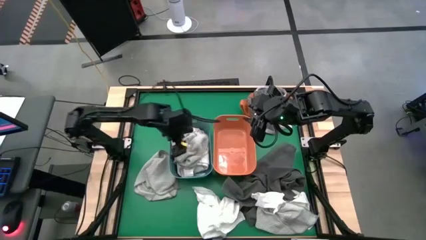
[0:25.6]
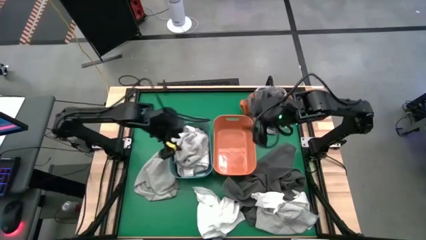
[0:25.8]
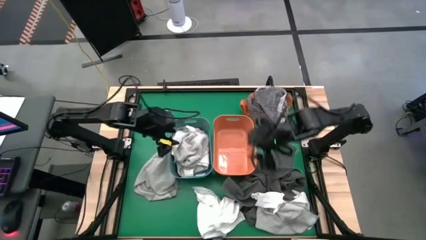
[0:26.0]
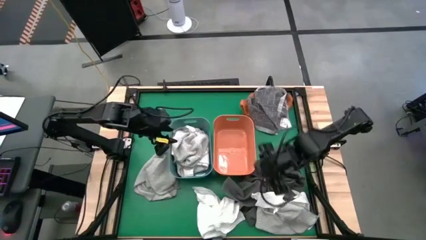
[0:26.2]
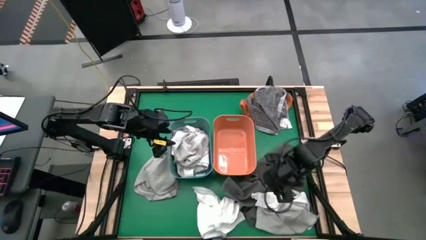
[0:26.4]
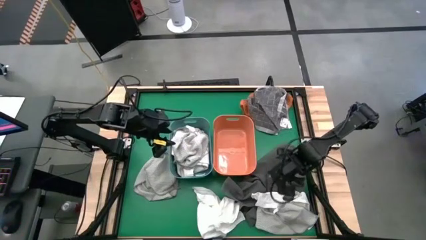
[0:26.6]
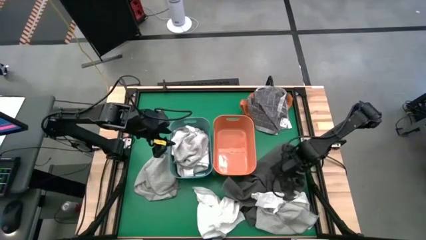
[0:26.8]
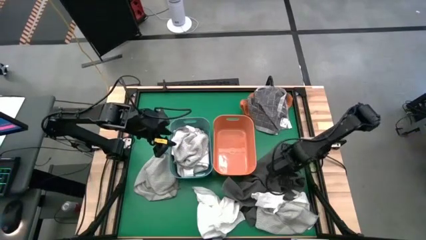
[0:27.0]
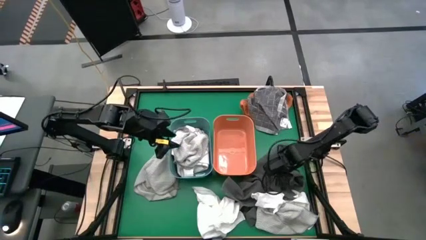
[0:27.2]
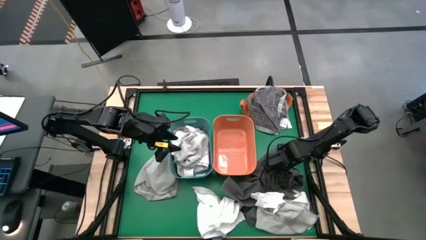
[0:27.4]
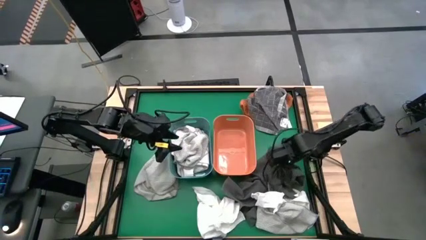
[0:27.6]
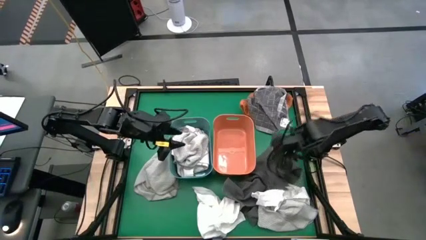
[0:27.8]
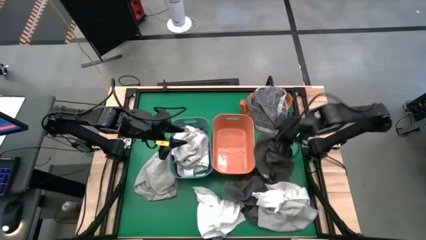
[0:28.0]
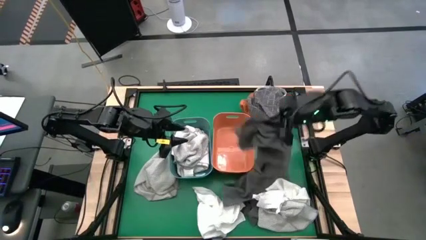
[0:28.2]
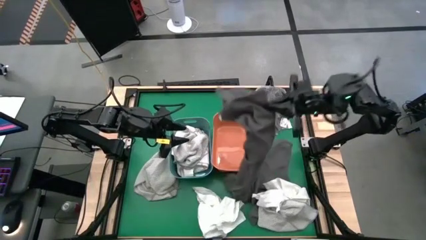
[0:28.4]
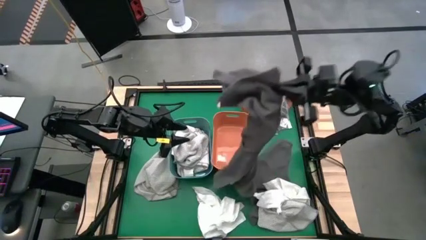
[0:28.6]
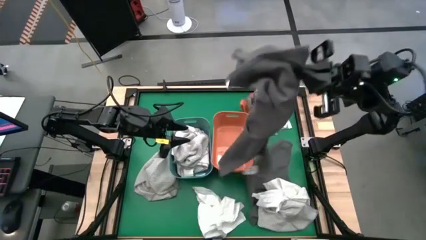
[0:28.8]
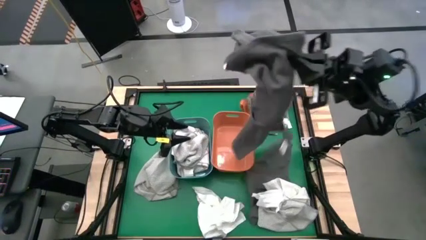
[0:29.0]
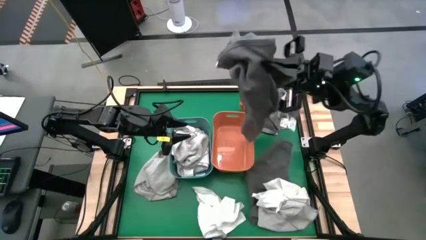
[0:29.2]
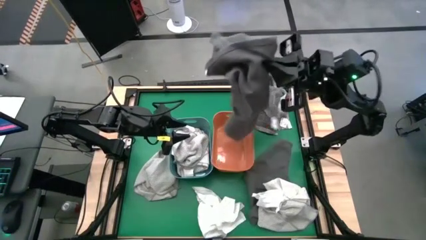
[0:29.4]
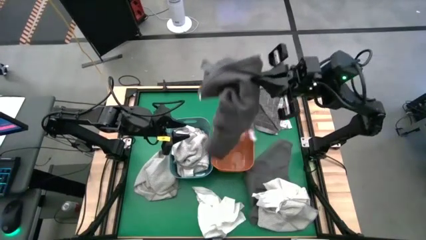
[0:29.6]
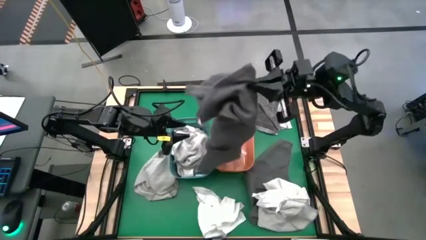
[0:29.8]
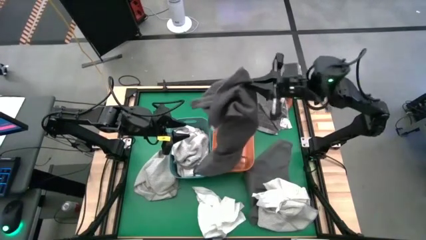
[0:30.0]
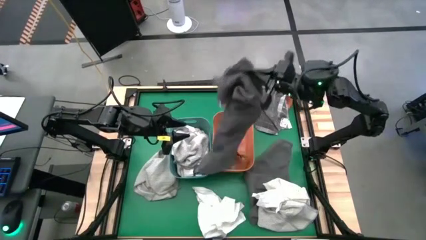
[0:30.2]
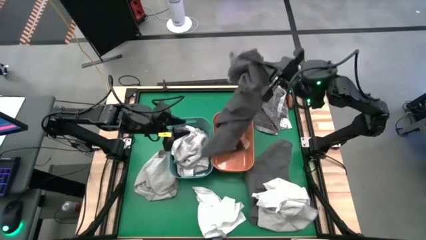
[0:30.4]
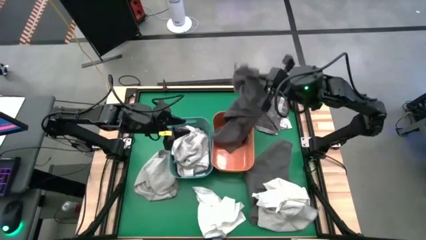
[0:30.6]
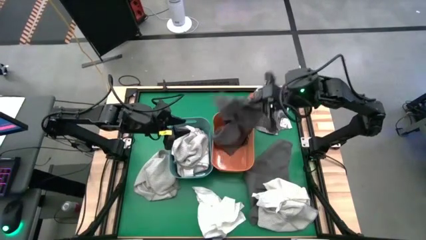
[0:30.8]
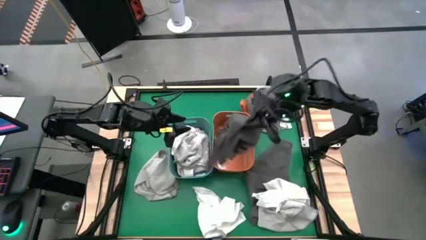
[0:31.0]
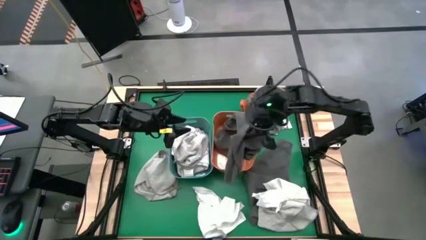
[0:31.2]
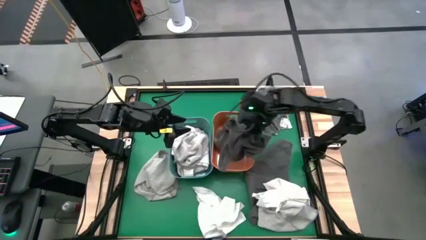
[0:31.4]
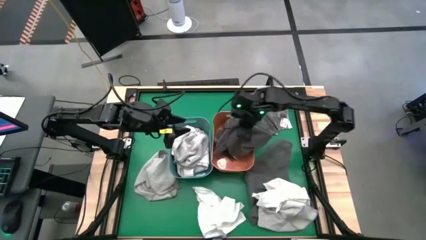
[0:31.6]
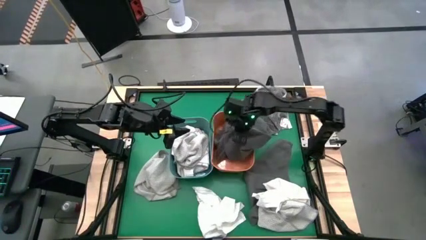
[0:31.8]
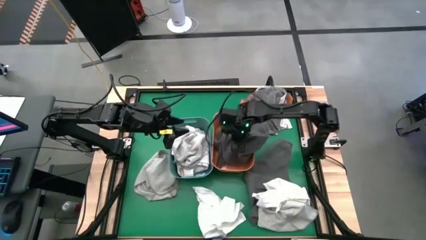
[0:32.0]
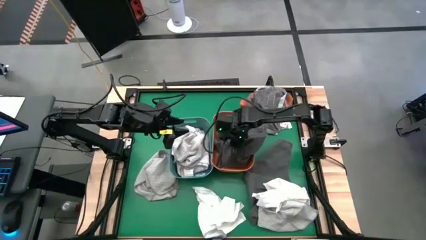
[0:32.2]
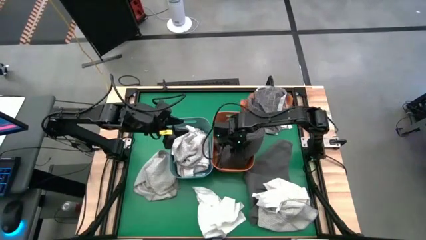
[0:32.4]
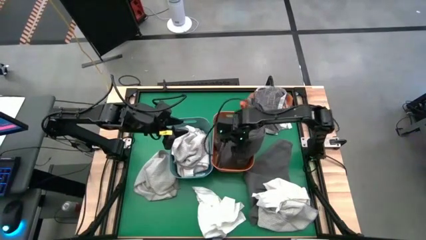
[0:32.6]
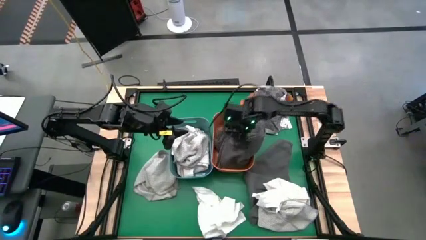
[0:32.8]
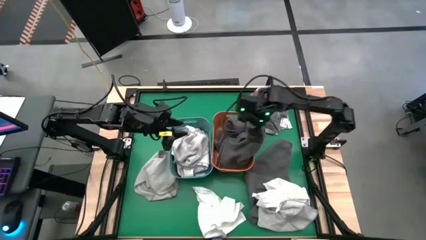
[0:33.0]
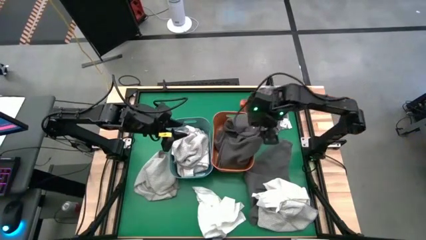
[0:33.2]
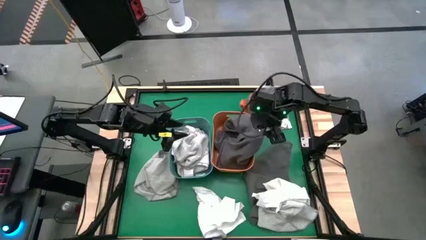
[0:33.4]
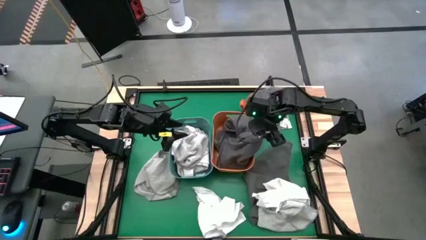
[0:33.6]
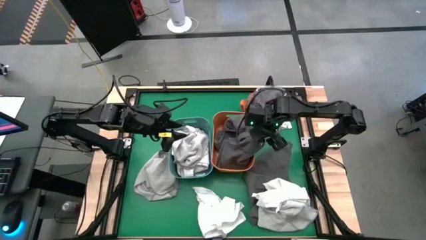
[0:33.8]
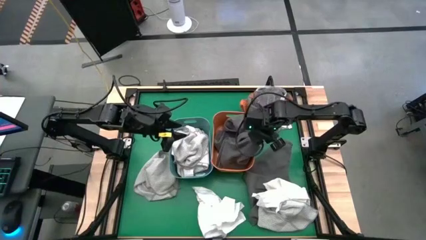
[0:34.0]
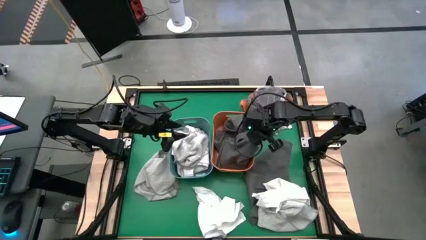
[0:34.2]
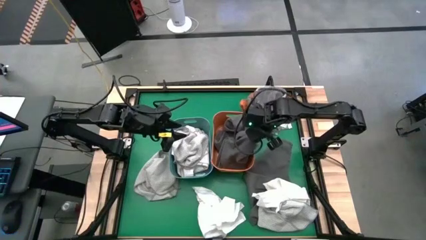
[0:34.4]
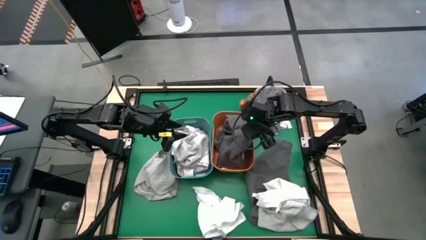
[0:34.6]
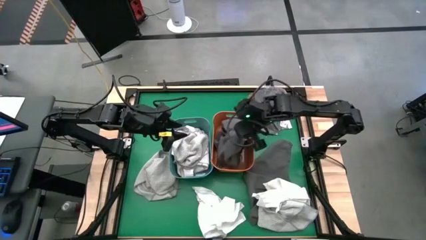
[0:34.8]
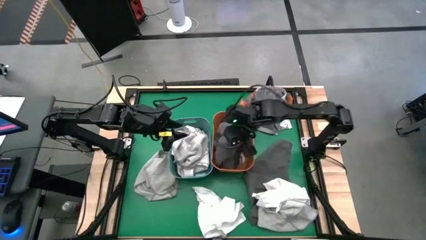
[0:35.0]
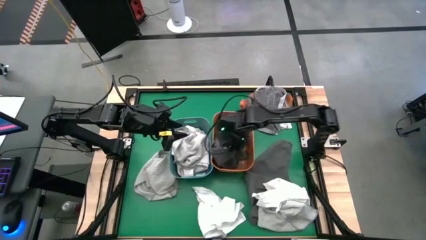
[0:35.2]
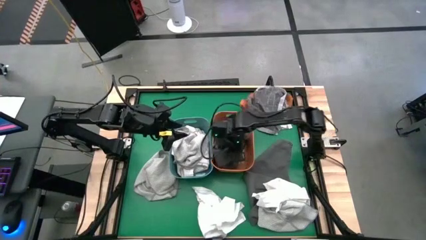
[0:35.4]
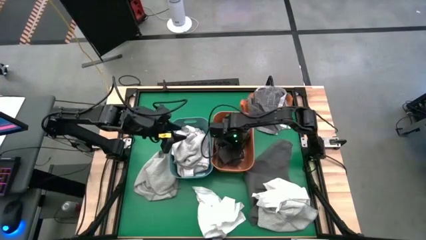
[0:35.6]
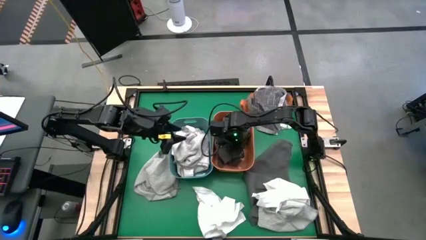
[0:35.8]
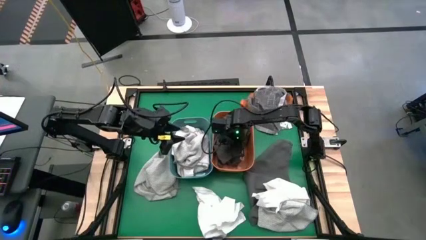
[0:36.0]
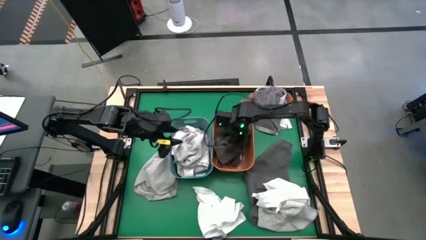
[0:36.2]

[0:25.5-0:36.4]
Task: Sort towels by color in basket
Put the dark gray towel into the orange bin

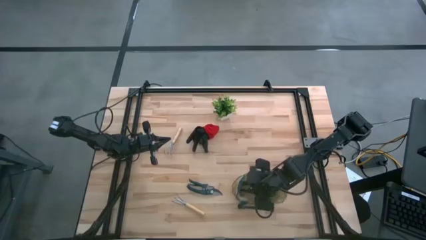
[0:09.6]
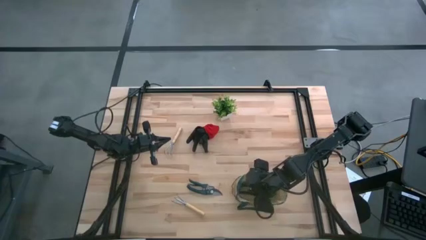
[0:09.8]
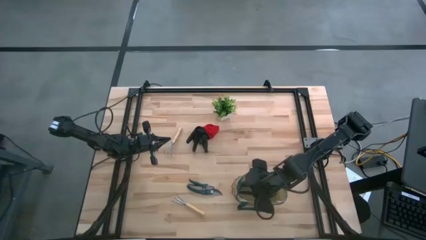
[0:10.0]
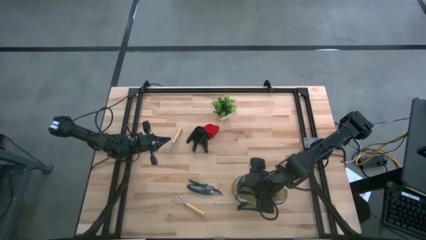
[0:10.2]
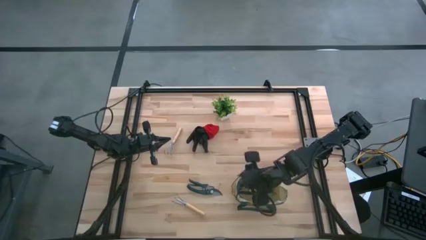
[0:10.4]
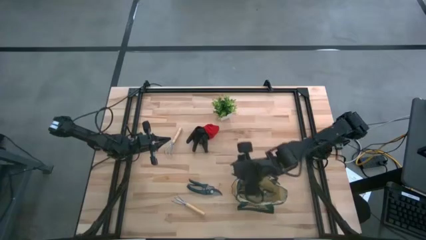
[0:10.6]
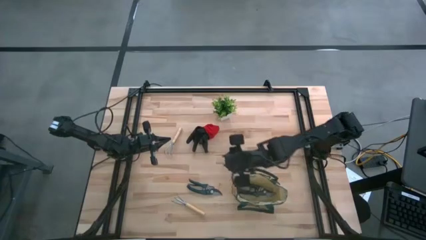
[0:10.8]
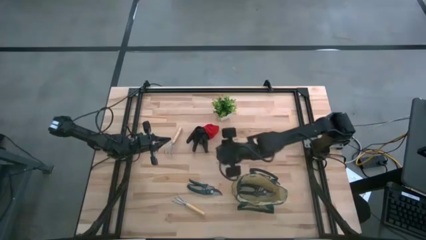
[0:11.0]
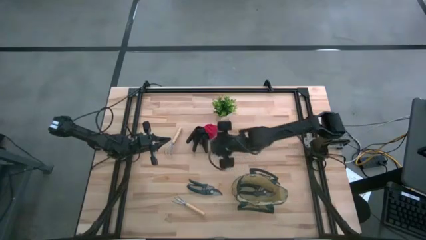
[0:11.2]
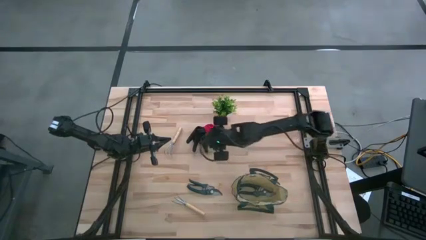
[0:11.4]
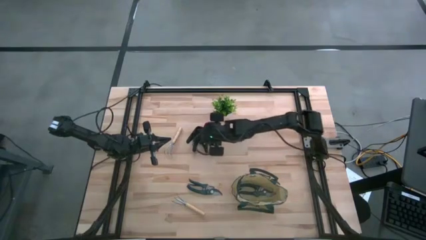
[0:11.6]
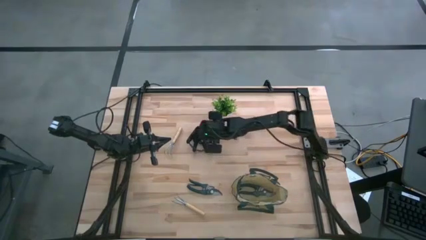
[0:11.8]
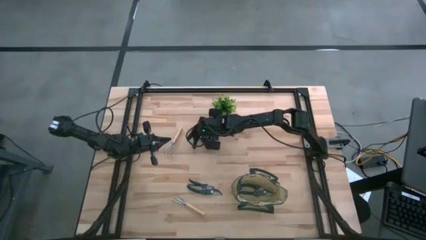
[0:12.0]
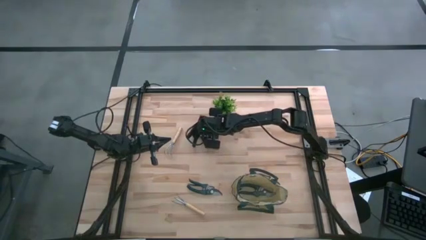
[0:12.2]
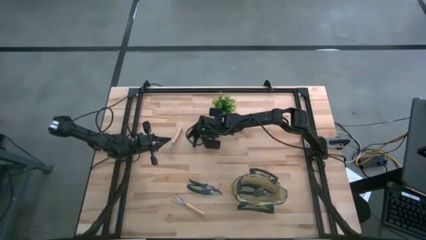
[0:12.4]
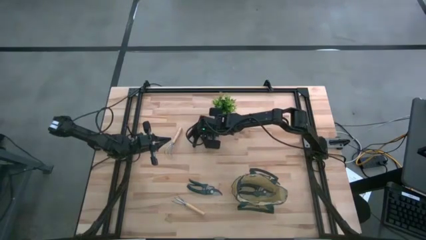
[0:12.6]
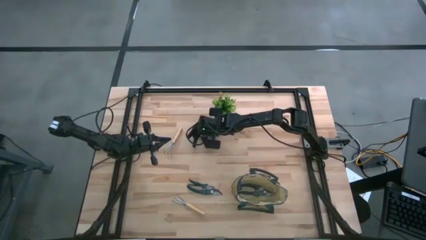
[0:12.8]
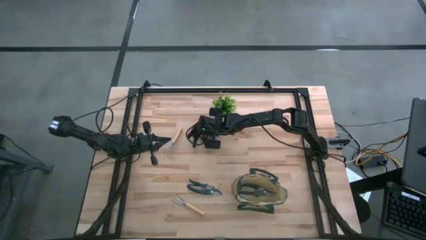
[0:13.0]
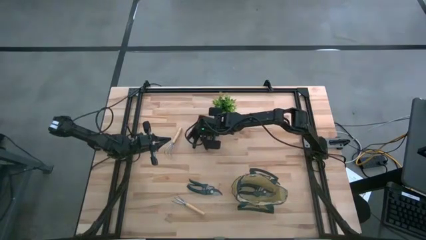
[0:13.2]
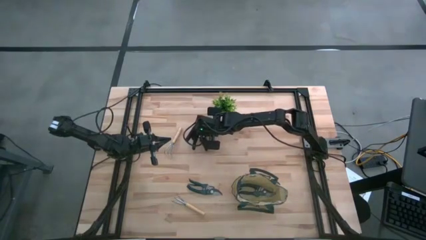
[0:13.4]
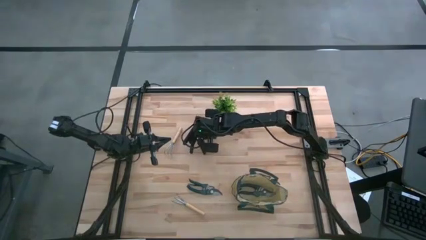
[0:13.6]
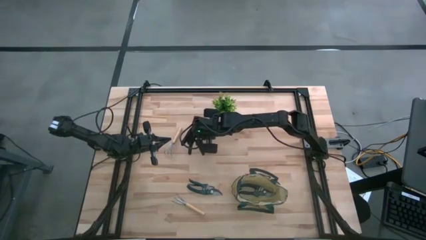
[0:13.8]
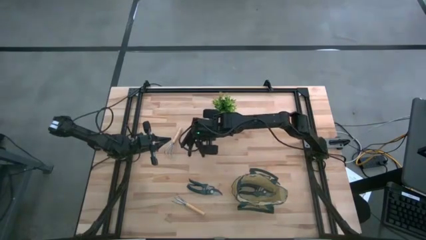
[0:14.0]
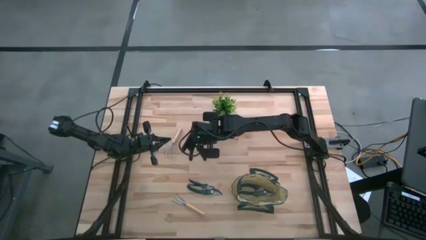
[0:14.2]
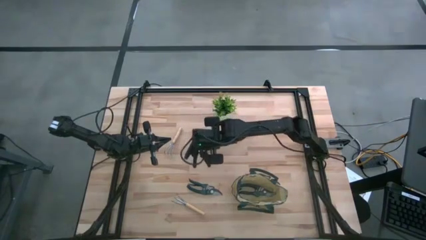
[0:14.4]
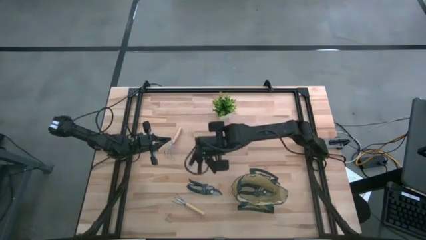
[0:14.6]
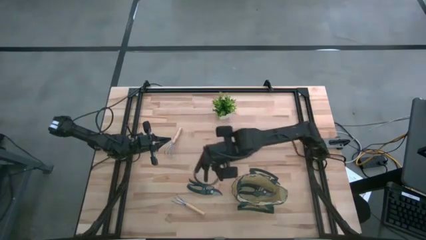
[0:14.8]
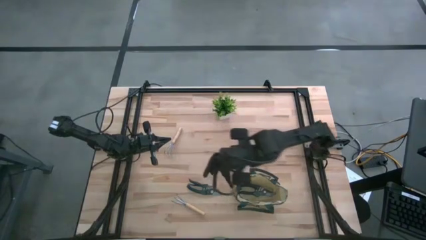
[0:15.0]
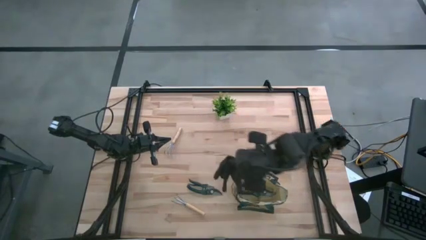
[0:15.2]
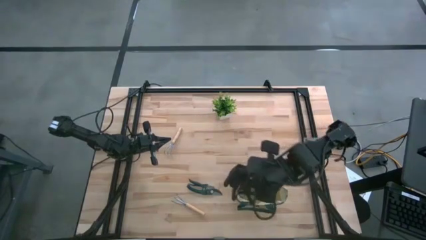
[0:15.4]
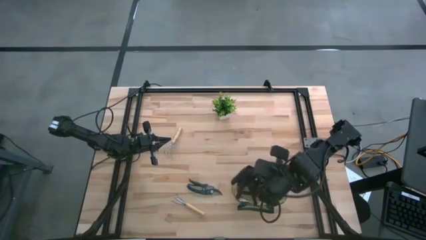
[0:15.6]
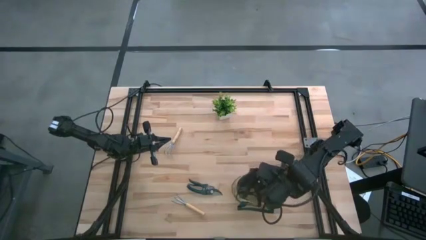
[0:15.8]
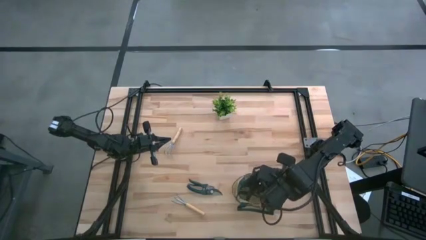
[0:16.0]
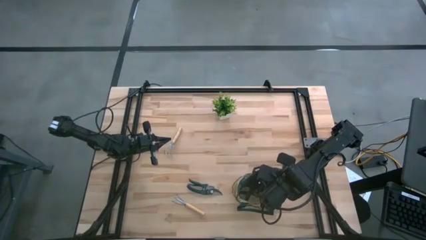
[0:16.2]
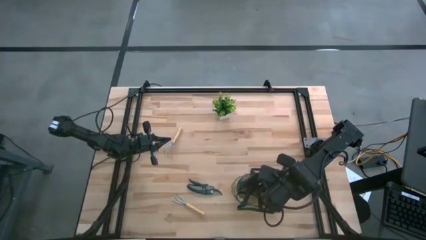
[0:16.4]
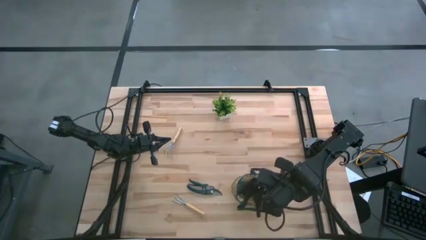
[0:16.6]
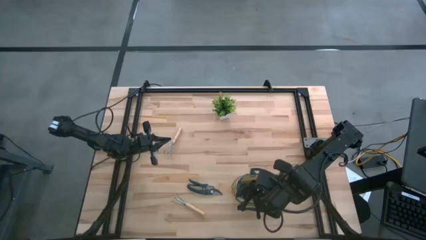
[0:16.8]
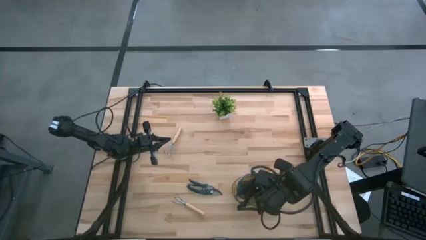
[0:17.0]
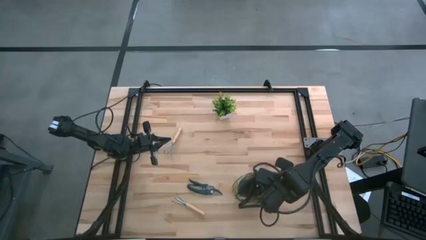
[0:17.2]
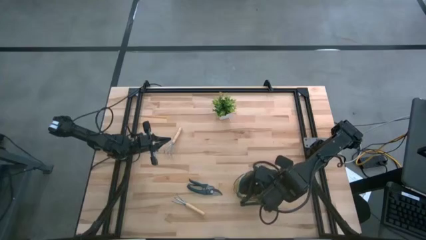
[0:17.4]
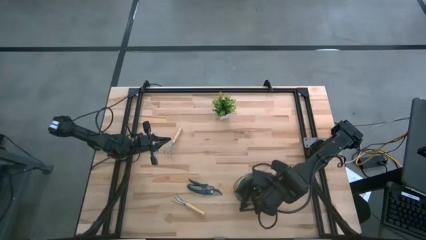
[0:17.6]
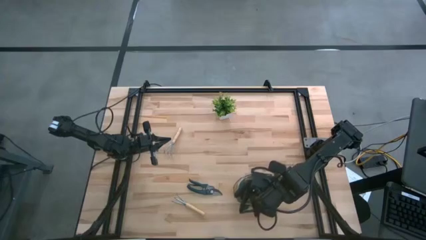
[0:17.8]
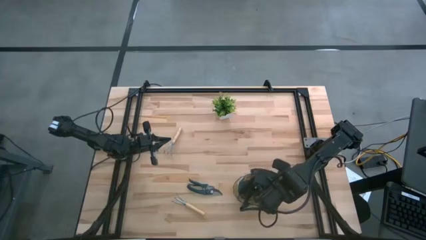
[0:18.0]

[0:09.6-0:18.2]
Task: Pick & Place Garden tools in Gardening bag
Put the black red gloves into the gardening bag
